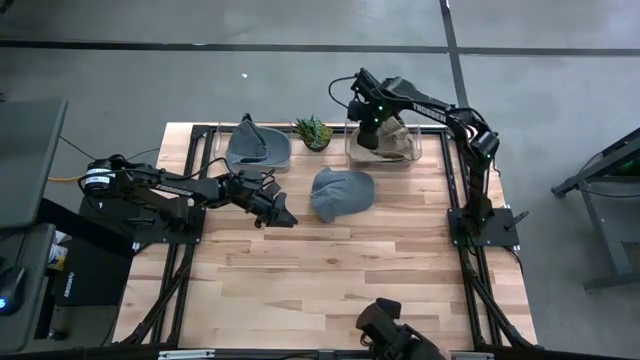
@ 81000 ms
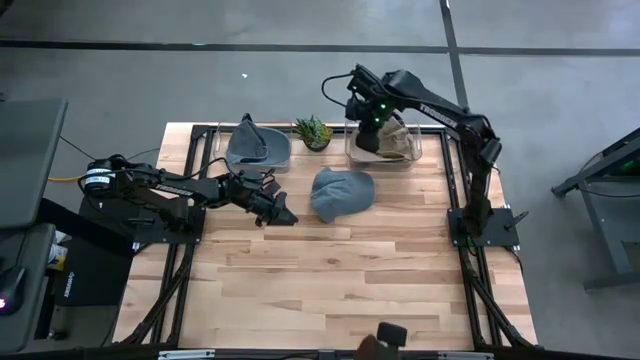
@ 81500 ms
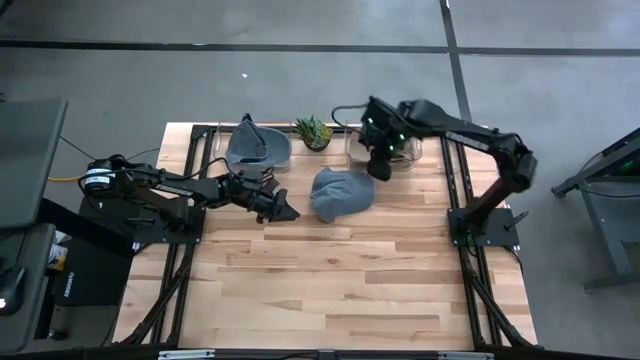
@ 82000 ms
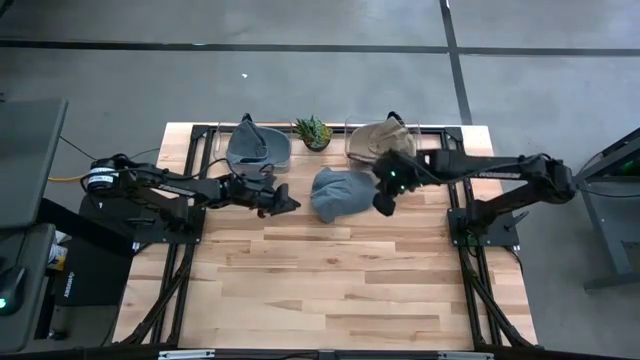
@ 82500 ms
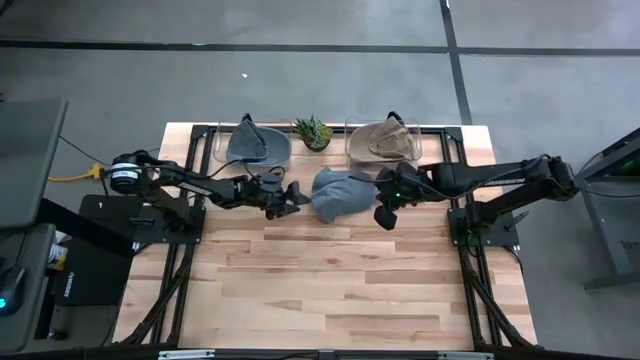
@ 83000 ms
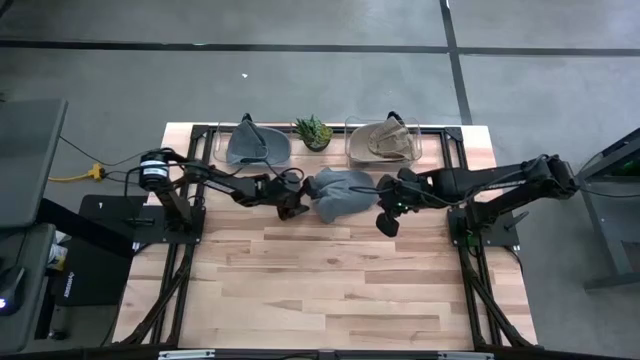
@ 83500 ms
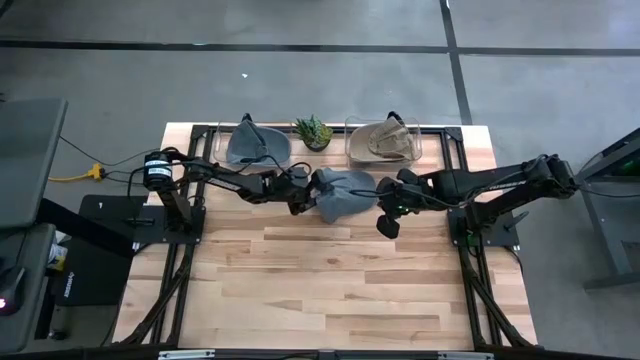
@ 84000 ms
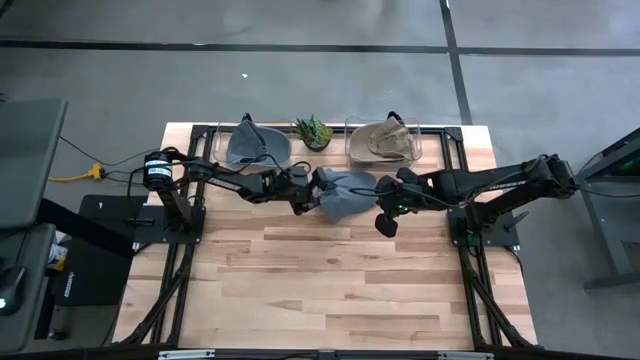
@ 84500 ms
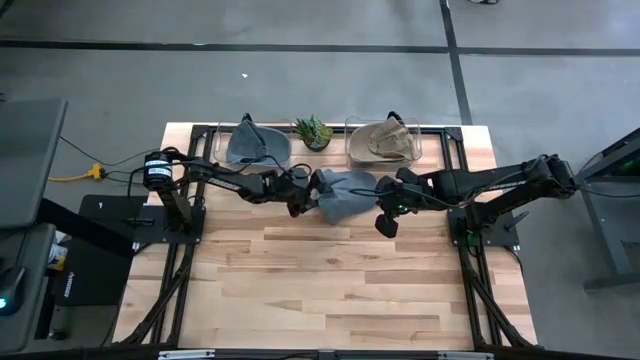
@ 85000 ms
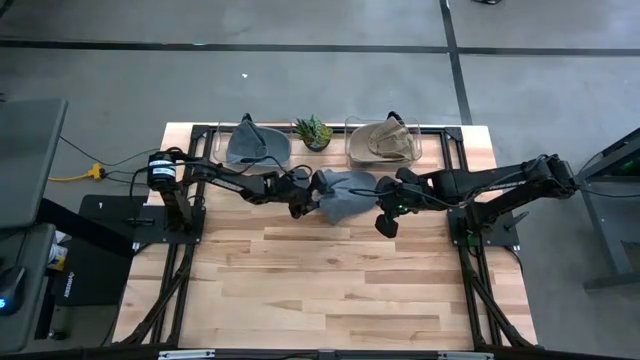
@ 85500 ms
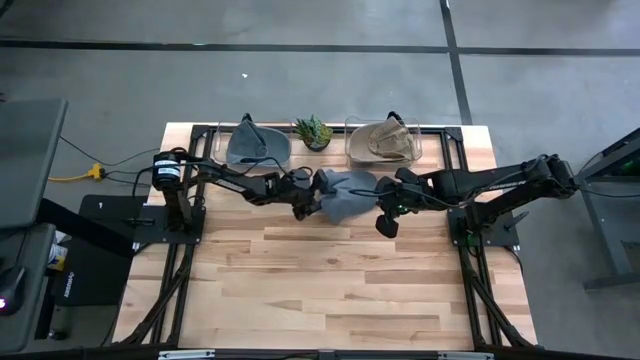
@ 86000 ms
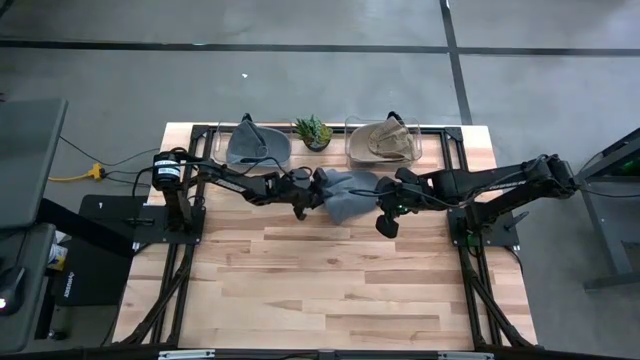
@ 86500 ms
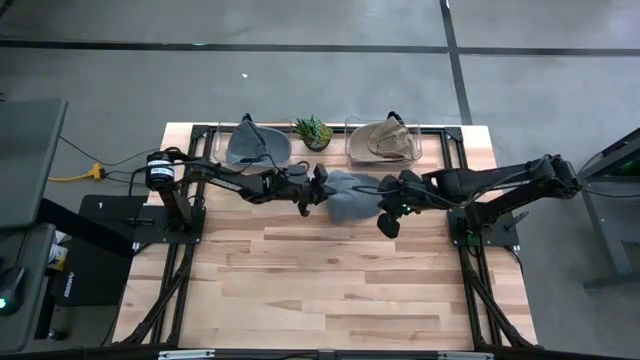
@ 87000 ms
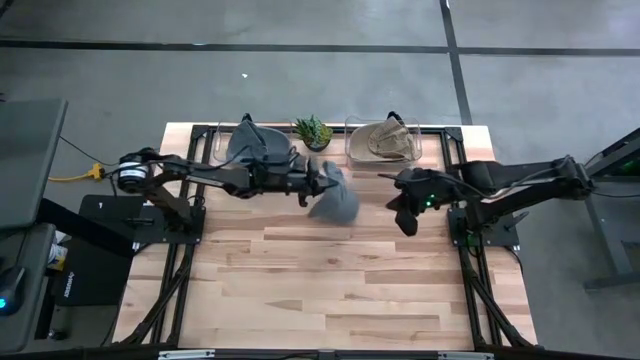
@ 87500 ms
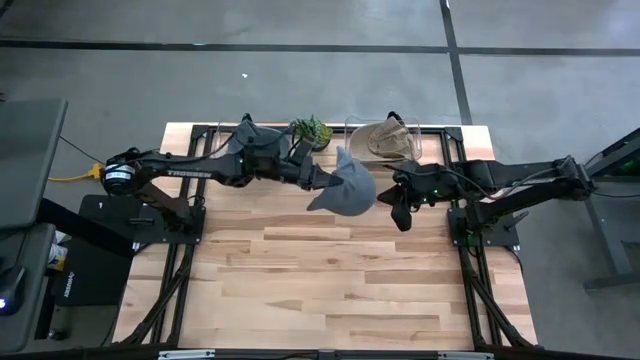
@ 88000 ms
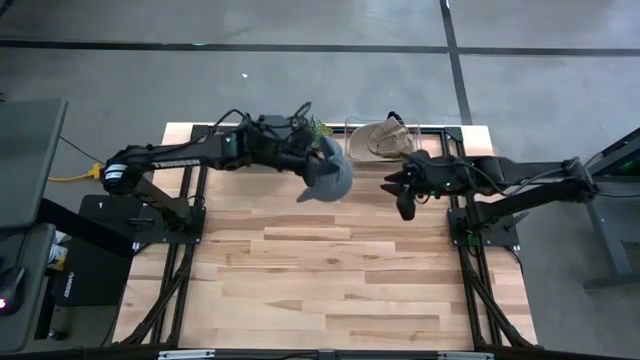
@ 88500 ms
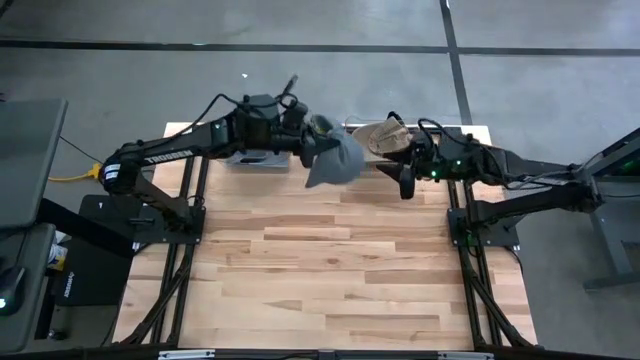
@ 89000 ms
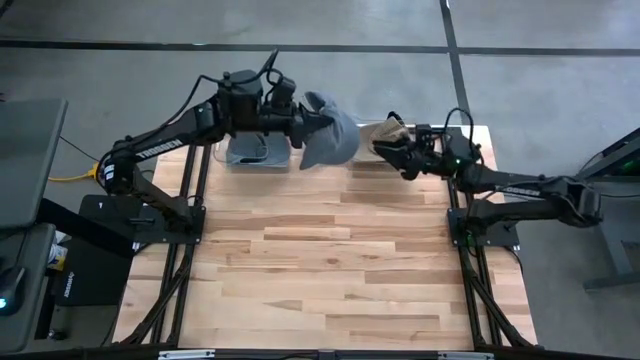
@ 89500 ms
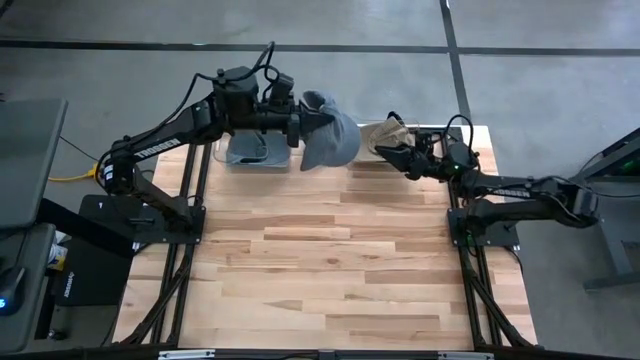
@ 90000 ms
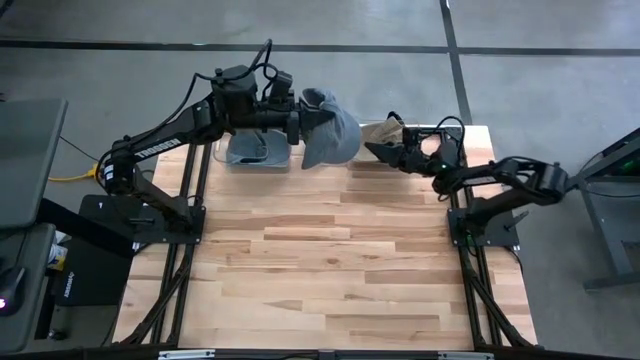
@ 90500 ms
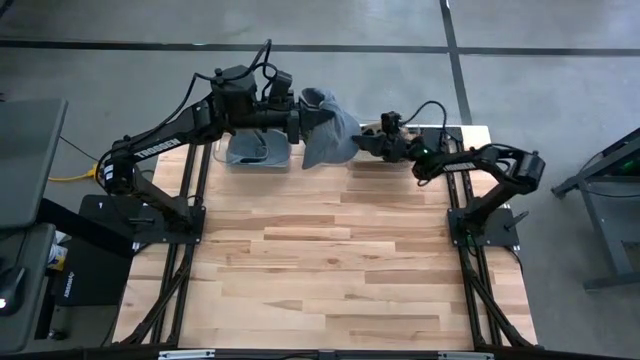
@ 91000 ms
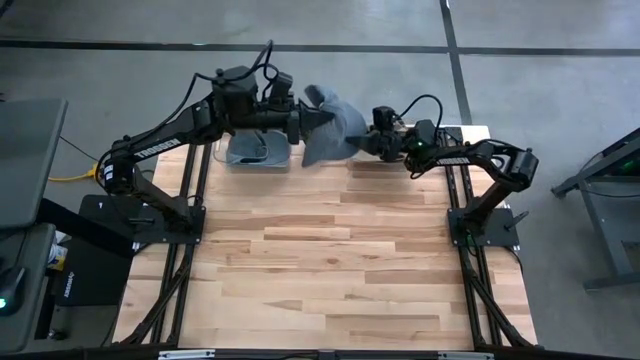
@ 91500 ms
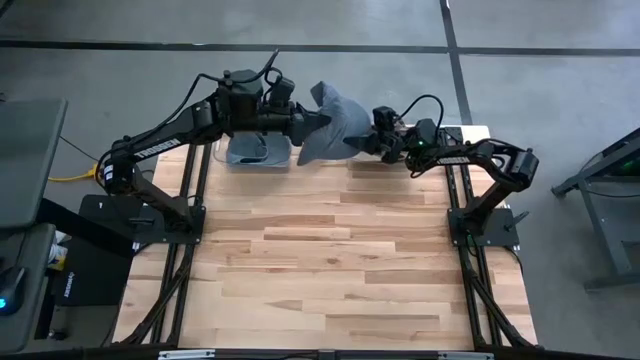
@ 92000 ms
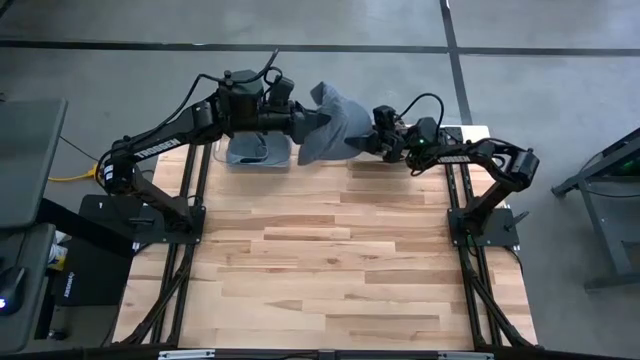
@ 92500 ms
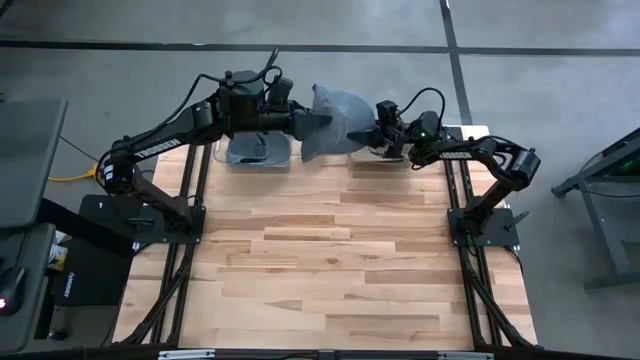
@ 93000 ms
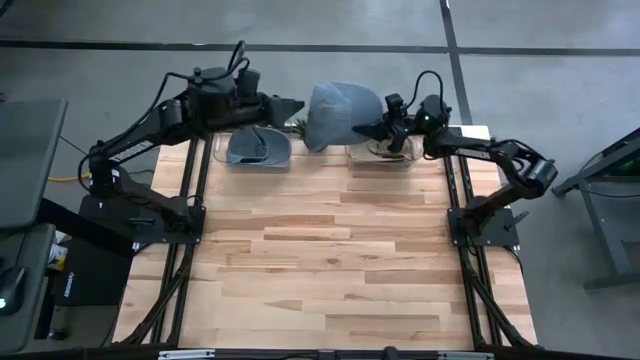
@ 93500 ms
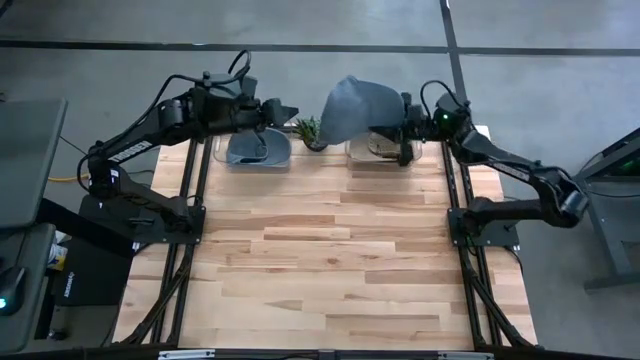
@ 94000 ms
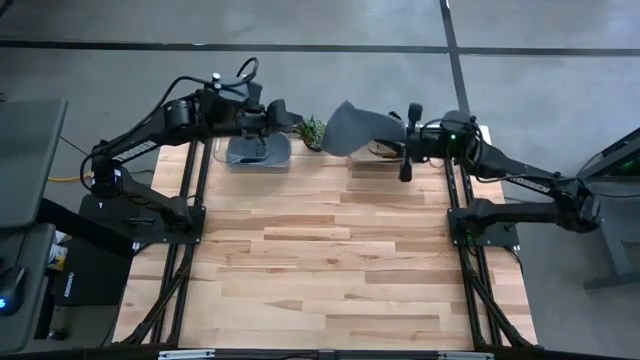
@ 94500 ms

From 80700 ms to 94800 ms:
Task: Pick & Place hat
Put the gray cap into the left transparent bin

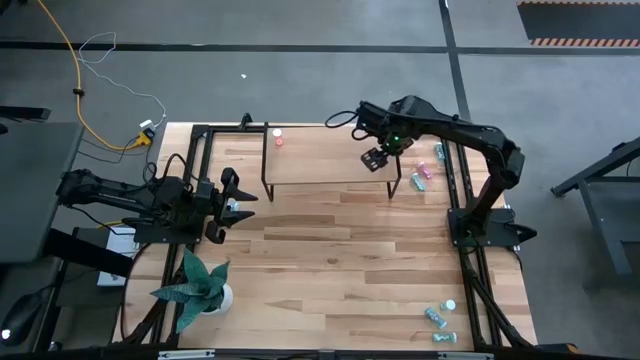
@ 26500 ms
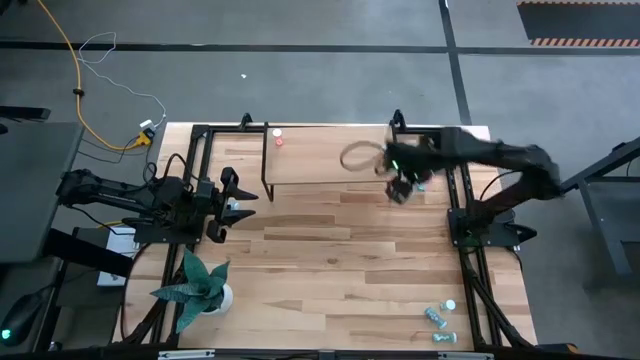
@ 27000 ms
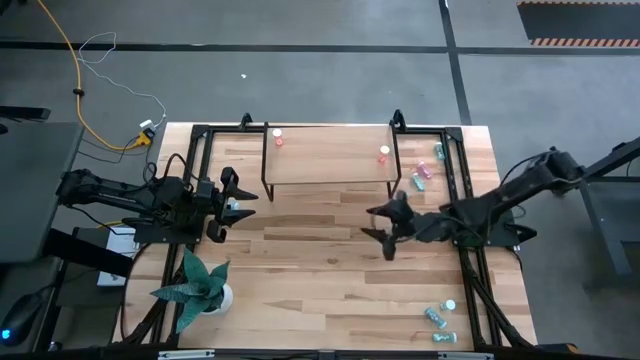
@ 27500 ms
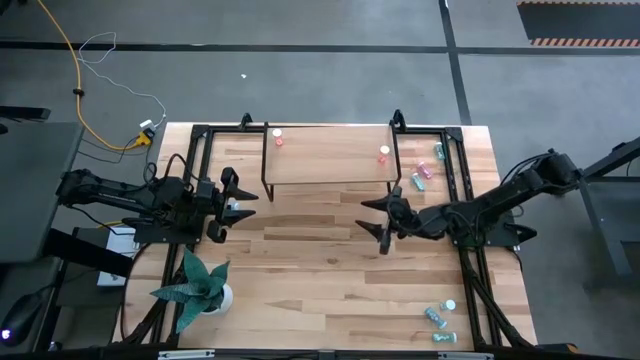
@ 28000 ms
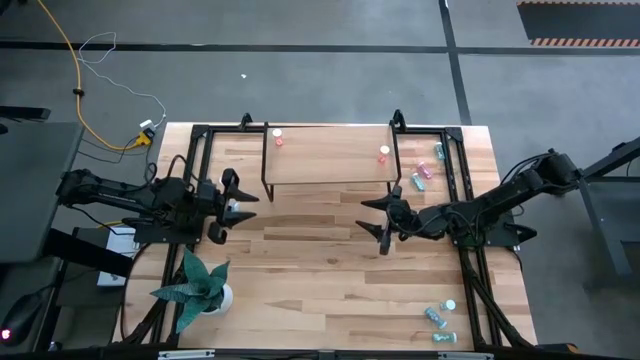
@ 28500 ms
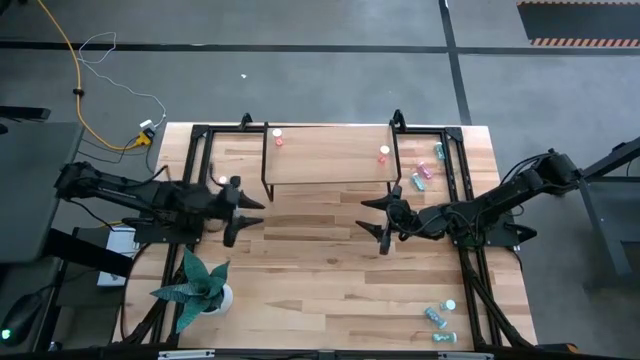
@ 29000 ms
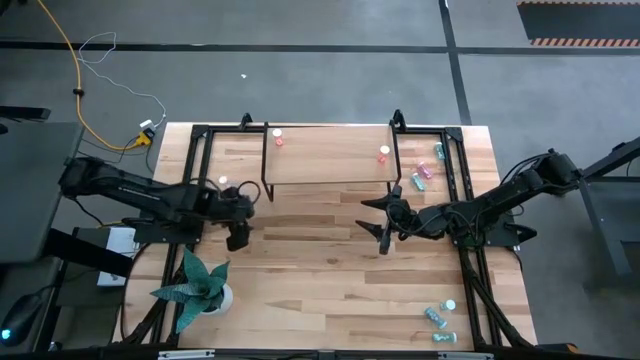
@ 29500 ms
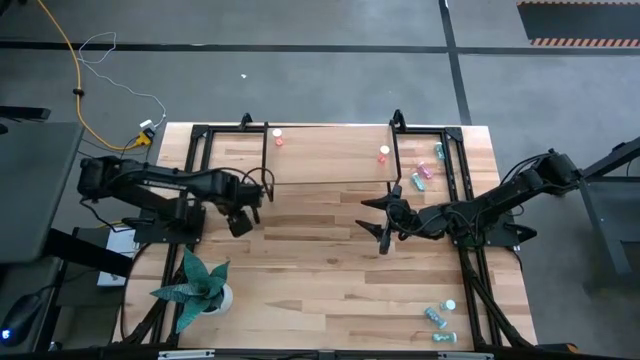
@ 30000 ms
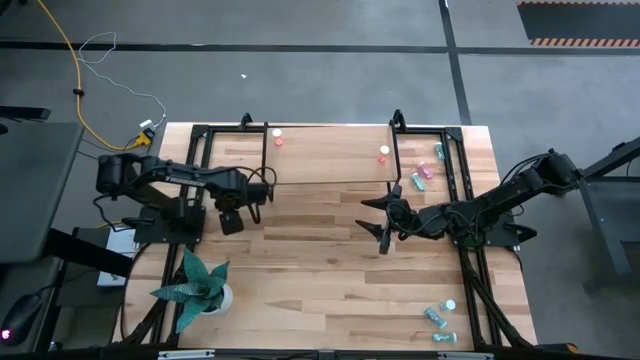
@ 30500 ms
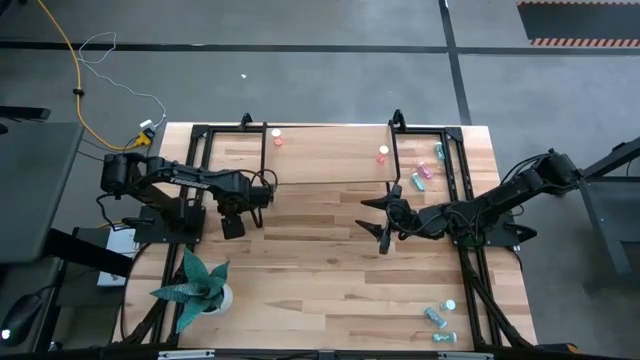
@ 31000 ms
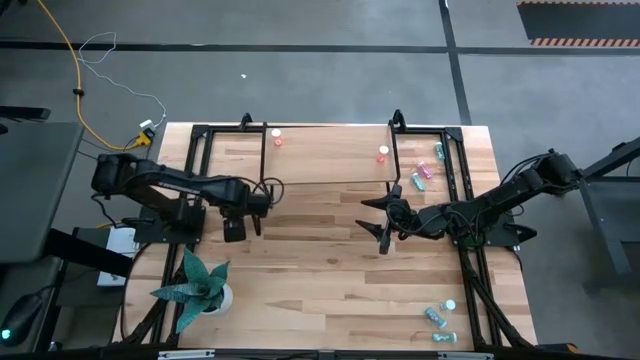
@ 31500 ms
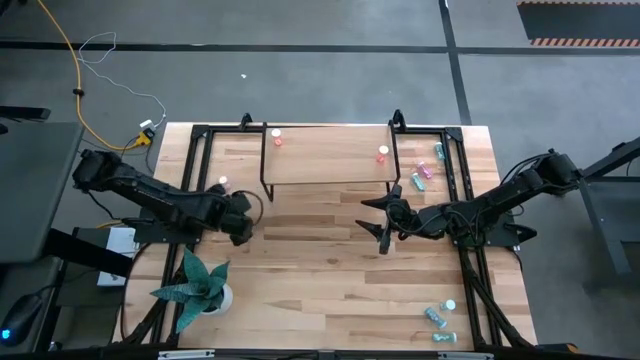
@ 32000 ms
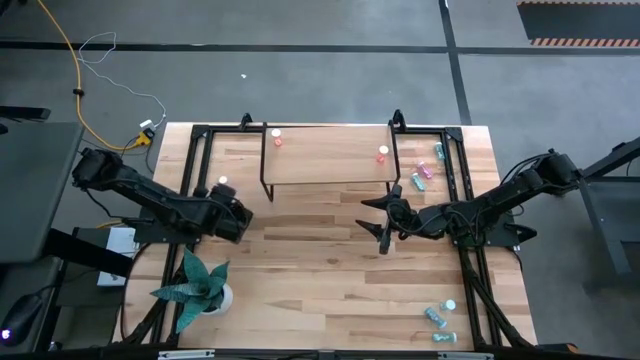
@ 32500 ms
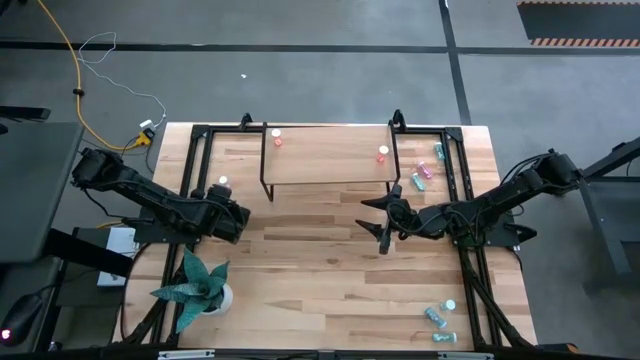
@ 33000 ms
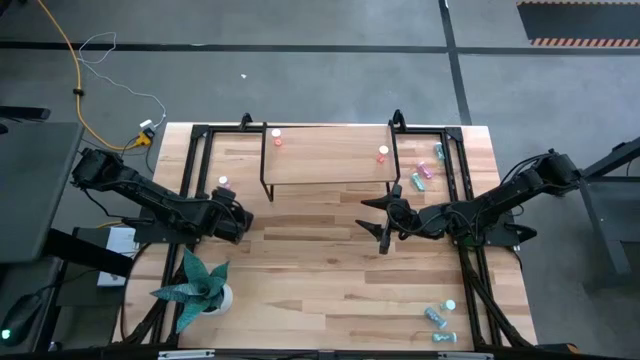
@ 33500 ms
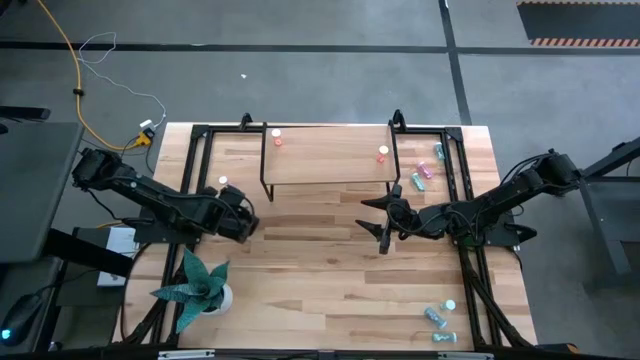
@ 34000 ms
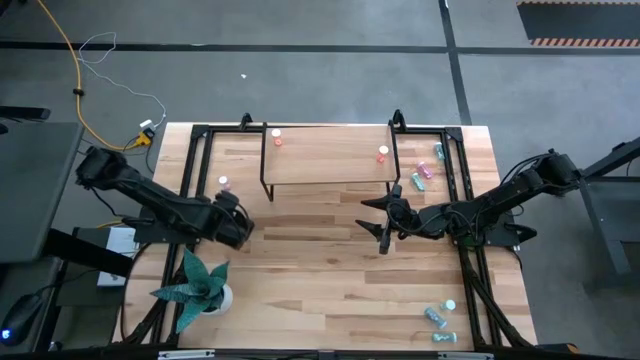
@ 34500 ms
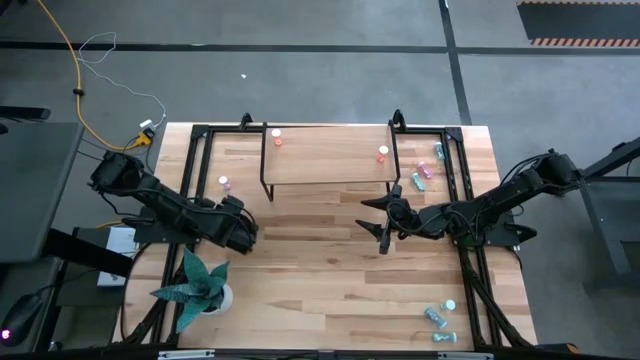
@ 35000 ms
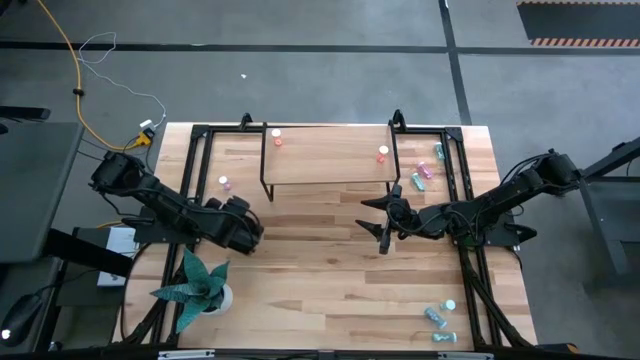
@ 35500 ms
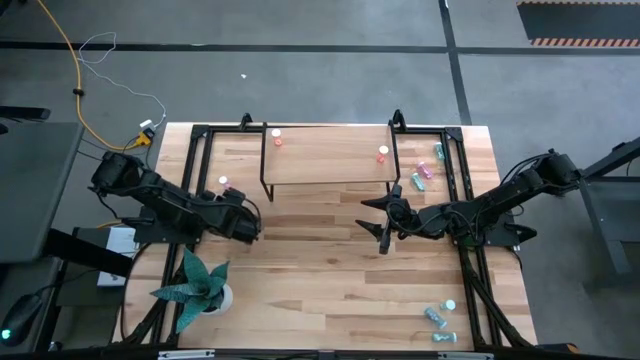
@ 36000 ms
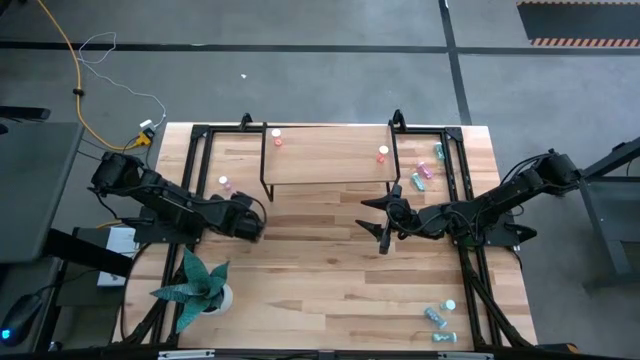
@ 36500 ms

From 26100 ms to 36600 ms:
Task: Pick and place medicine bottles onto shelf by color
Put the blue pill bottle on the shelf
